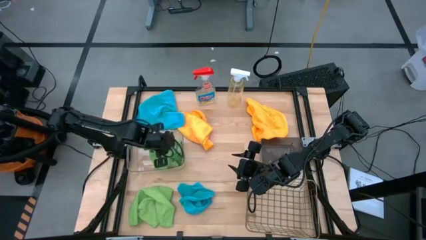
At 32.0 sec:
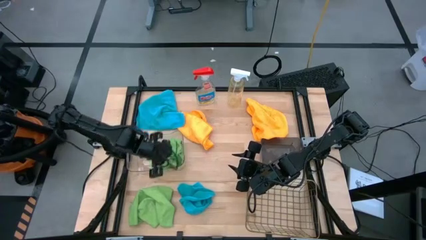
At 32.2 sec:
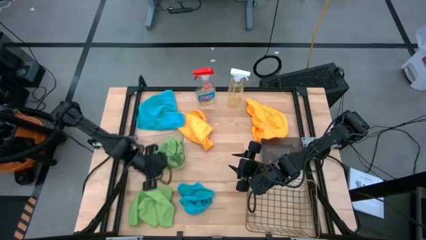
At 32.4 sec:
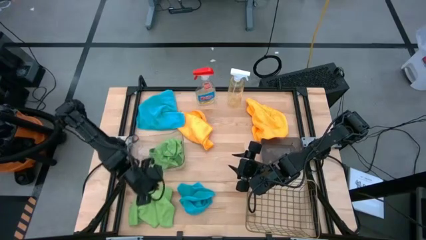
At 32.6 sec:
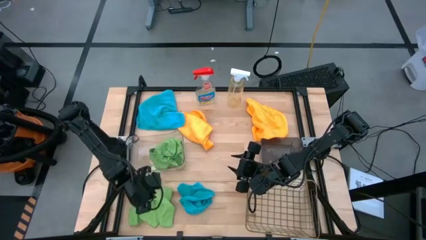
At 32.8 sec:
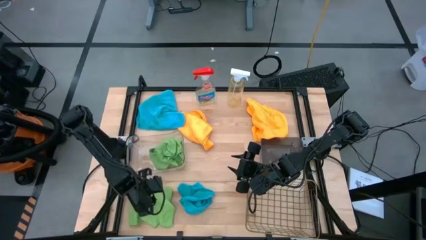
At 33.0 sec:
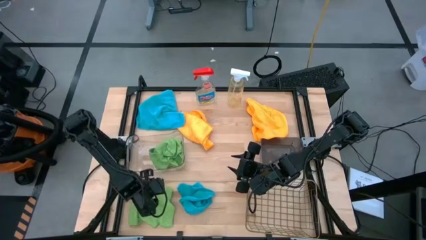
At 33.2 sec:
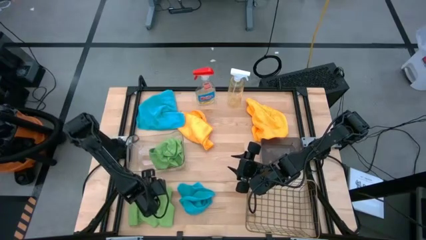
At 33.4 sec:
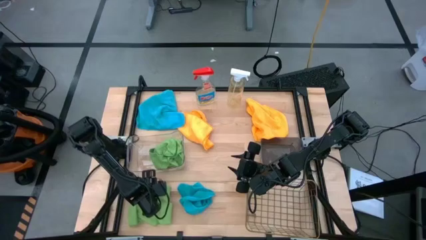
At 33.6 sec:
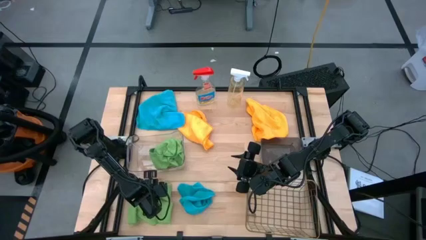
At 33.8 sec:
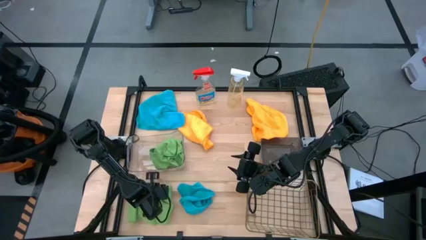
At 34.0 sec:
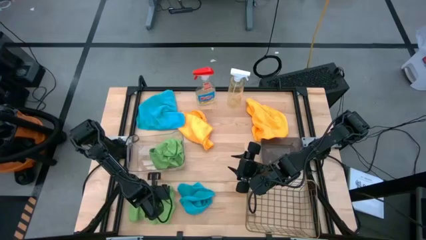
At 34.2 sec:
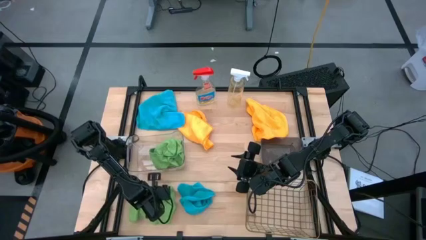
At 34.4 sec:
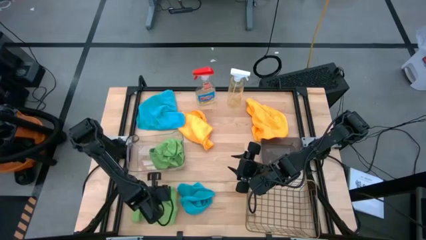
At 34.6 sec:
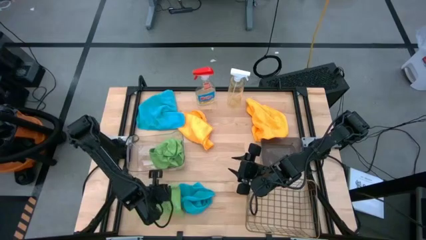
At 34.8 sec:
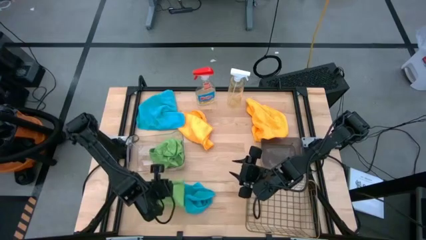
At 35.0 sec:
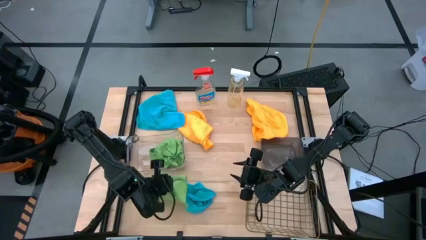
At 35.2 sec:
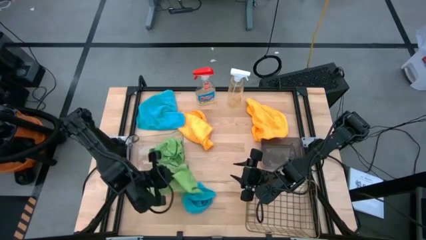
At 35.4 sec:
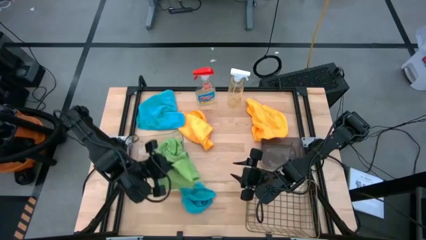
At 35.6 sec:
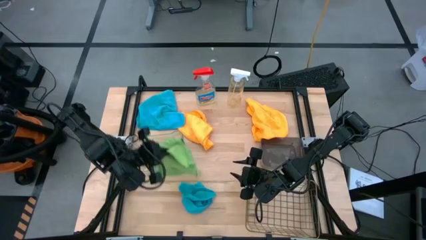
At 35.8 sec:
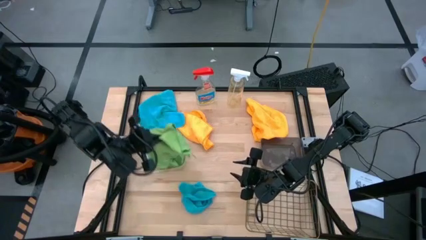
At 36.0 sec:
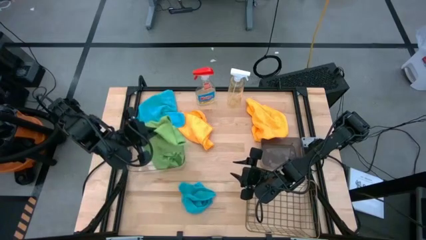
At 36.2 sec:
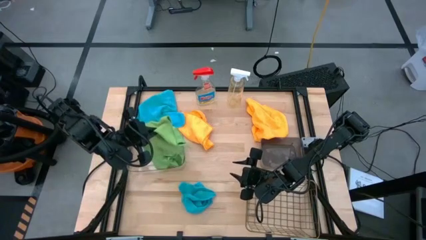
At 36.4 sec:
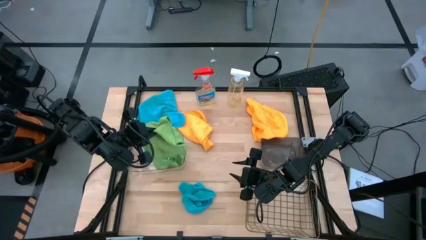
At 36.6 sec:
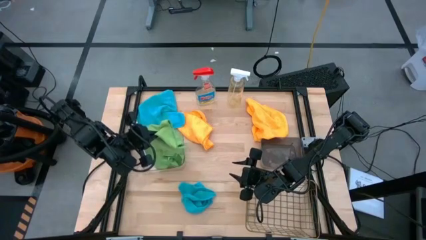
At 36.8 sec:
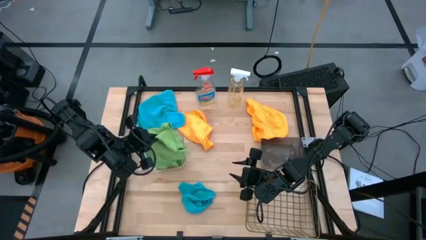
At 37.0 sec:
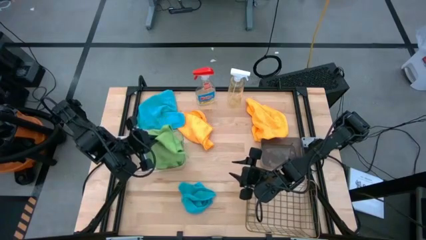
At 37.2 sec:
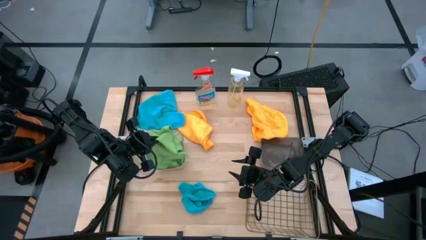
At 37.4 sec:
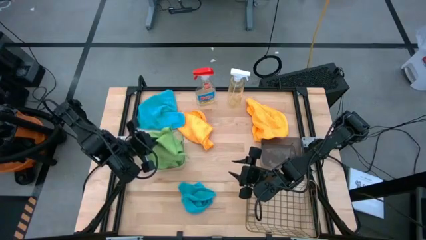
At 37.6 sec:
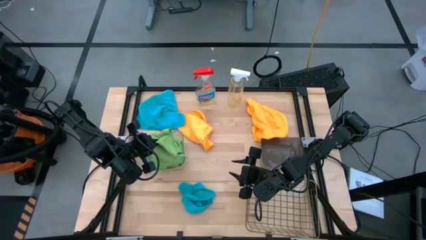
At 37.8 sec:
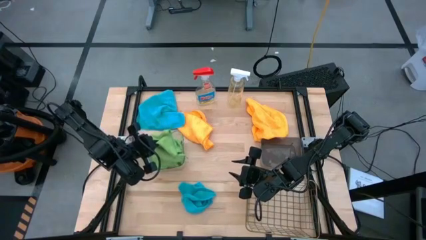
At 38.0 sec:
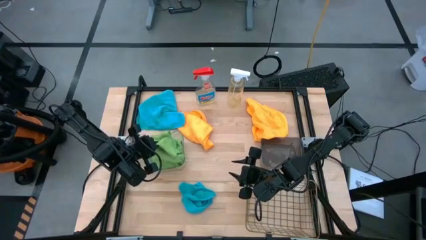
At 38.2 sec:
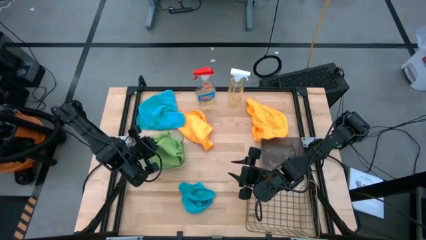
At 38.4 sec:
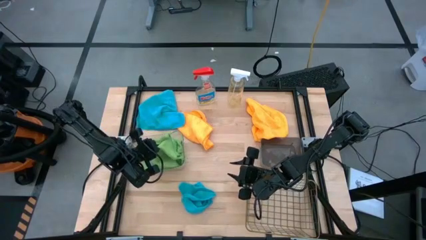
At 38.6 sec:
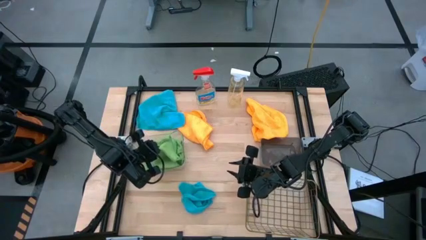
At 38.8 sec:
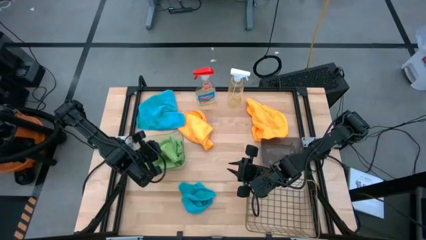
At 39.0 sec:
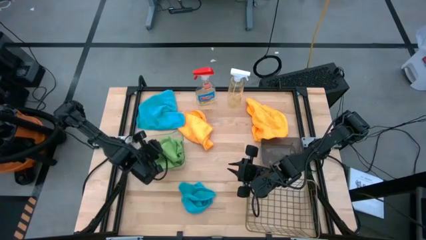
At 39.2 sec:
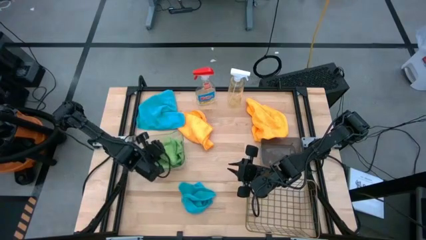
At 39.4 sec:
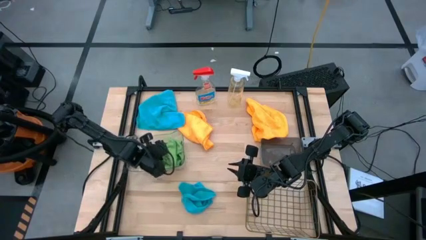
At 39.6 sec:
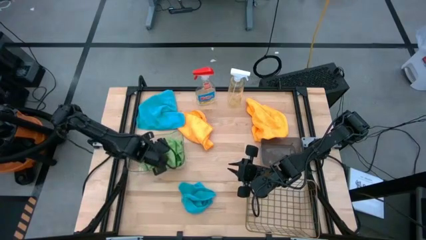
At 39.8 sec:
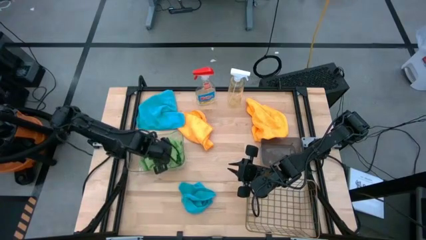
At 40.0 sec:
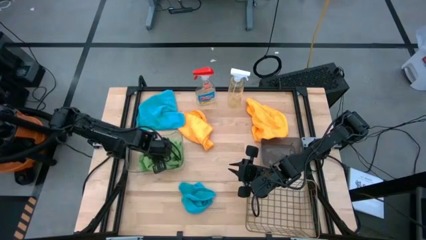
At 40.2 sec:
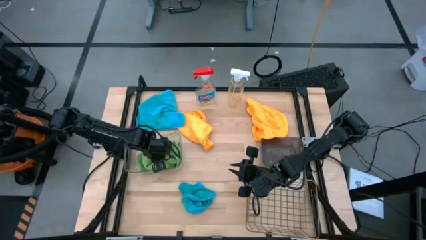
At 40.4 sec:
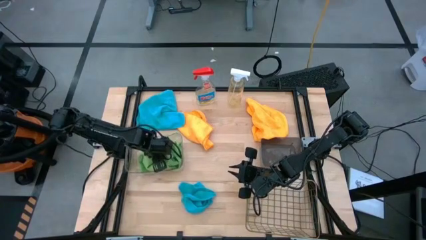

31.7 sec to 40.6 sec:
Task: Sort microfiber towel by color & place in baskets
Put the green microfiber cloth into the transparent bin
